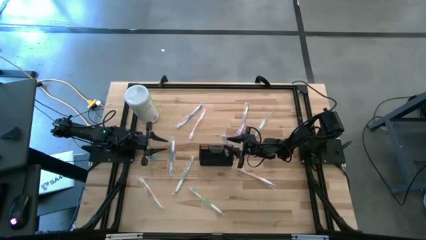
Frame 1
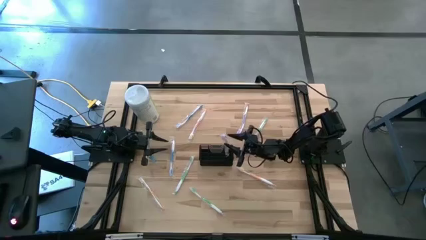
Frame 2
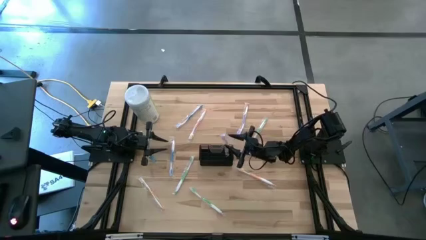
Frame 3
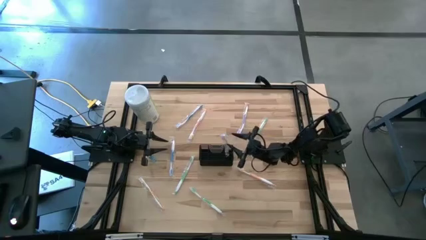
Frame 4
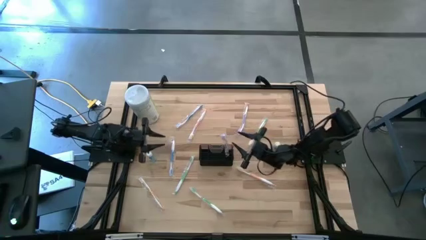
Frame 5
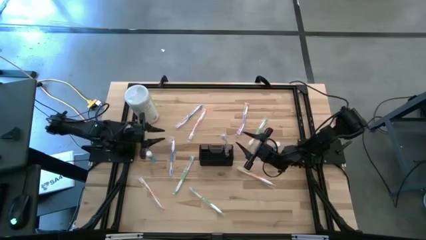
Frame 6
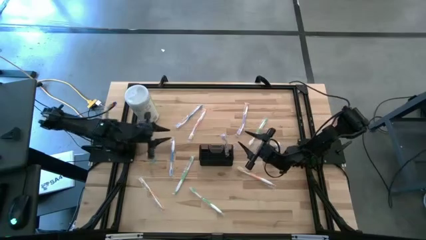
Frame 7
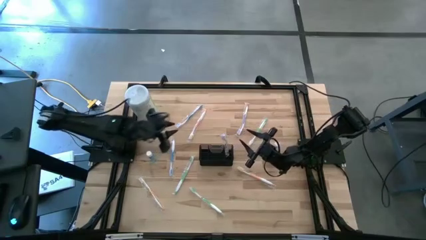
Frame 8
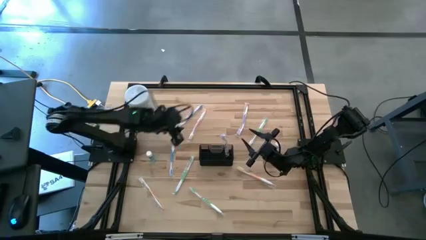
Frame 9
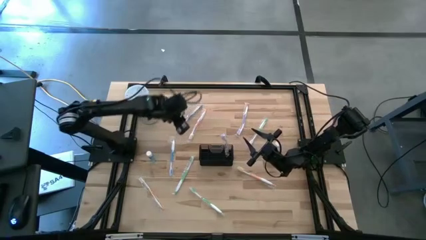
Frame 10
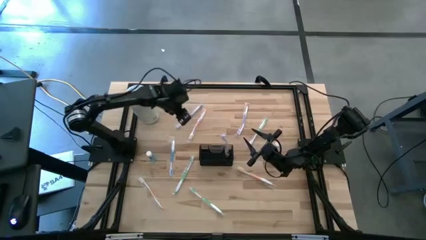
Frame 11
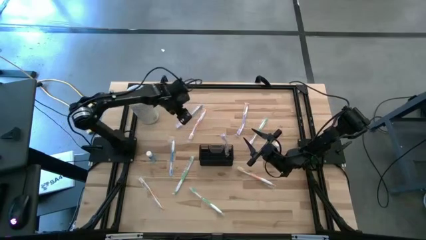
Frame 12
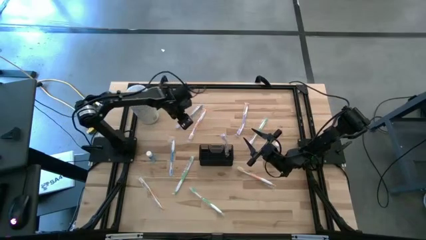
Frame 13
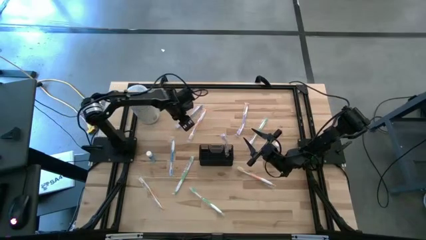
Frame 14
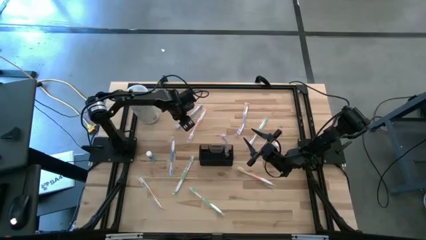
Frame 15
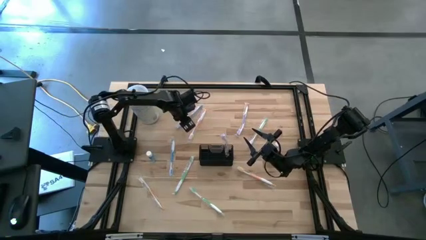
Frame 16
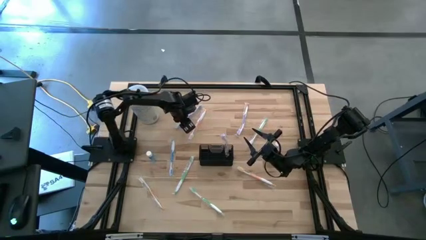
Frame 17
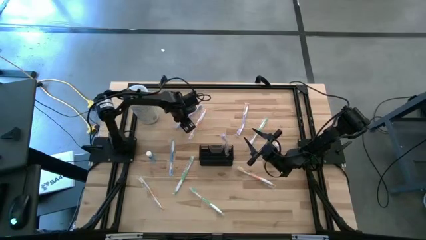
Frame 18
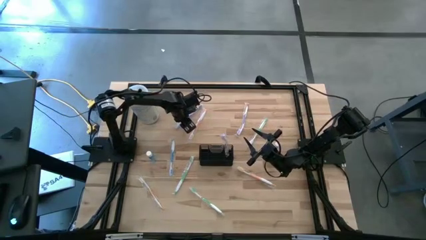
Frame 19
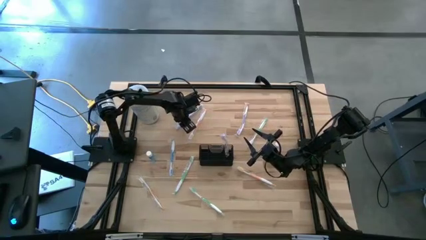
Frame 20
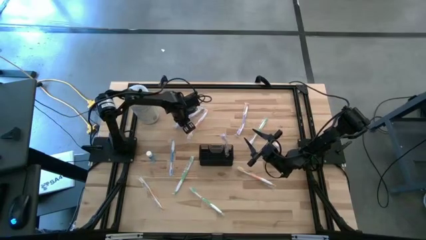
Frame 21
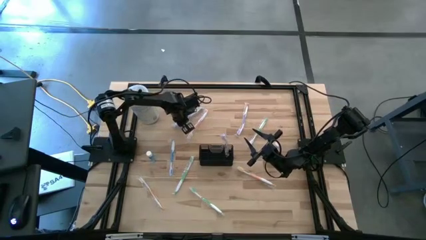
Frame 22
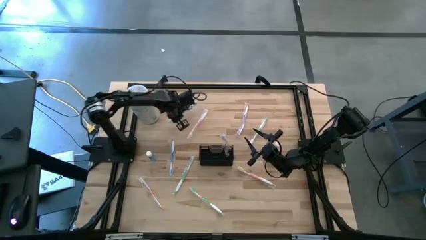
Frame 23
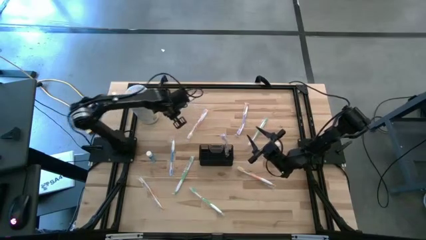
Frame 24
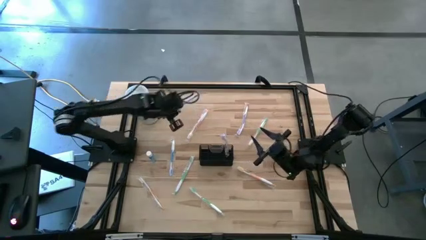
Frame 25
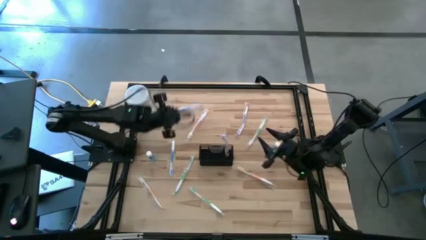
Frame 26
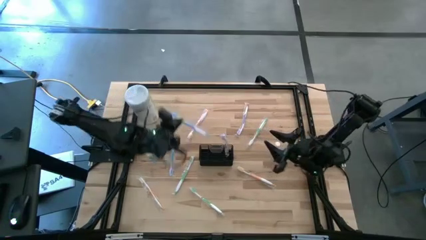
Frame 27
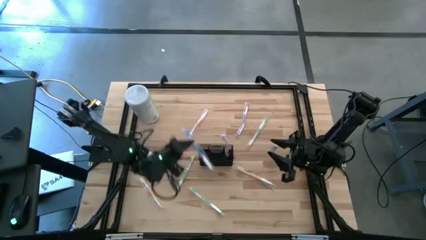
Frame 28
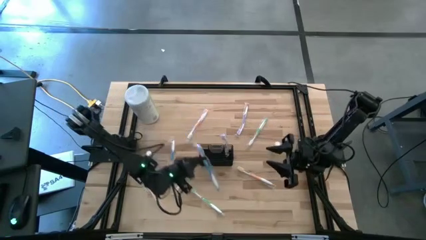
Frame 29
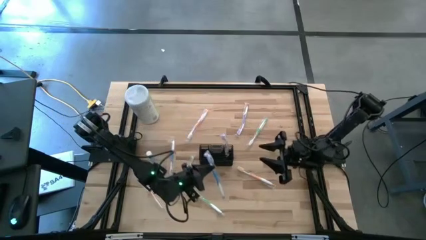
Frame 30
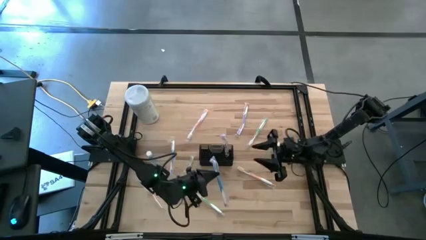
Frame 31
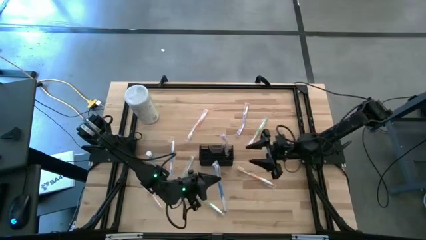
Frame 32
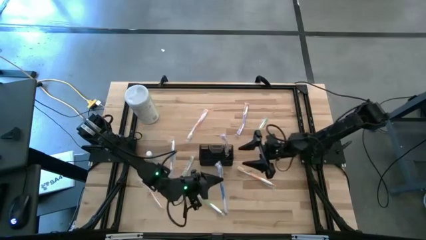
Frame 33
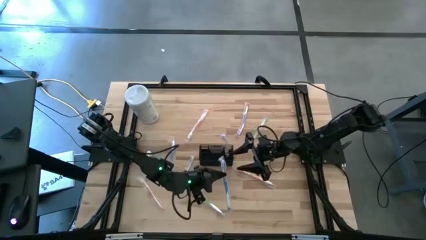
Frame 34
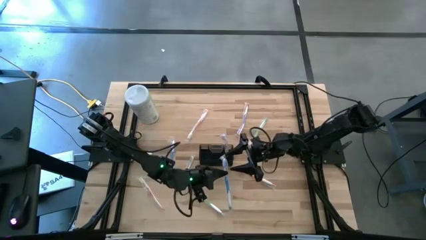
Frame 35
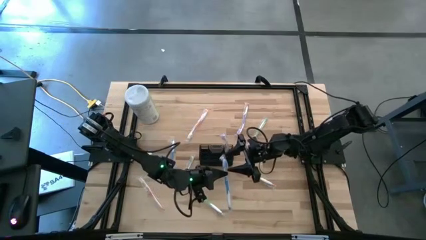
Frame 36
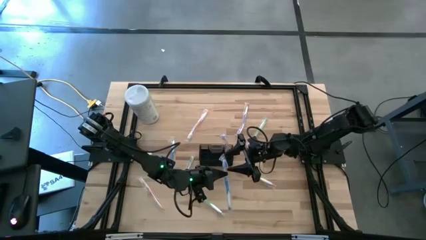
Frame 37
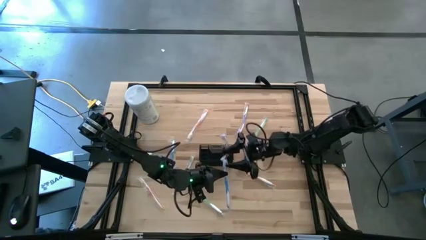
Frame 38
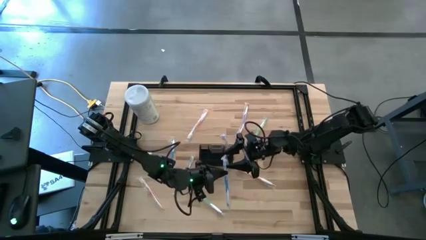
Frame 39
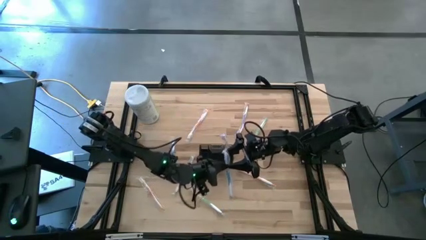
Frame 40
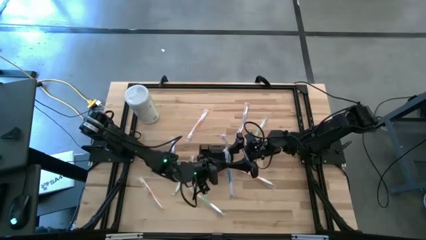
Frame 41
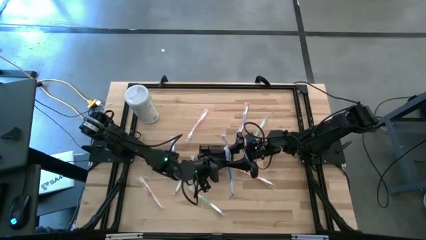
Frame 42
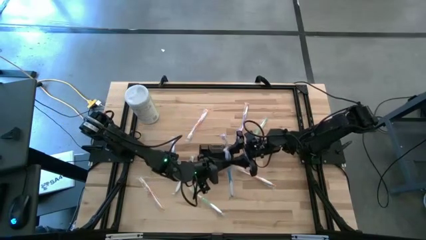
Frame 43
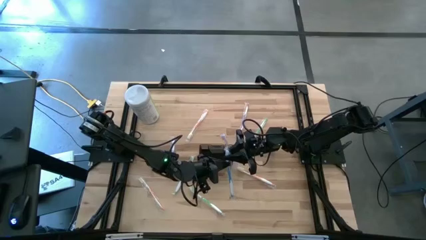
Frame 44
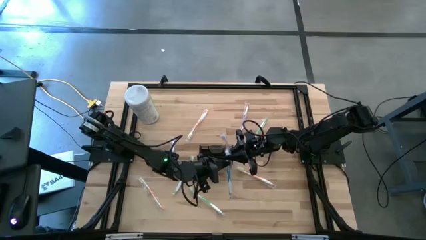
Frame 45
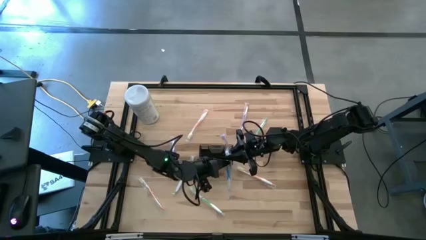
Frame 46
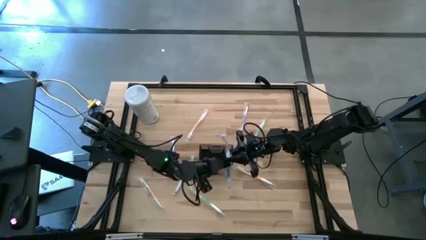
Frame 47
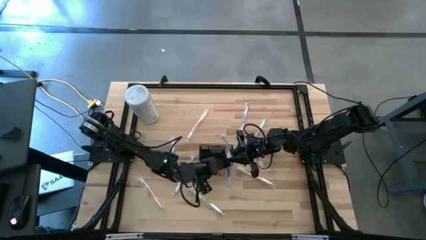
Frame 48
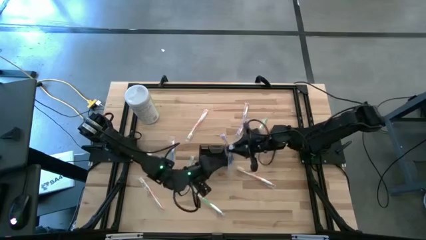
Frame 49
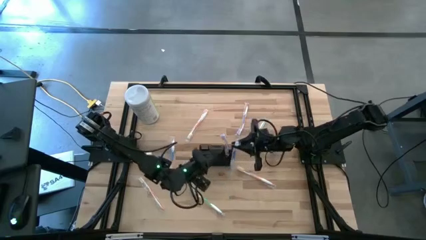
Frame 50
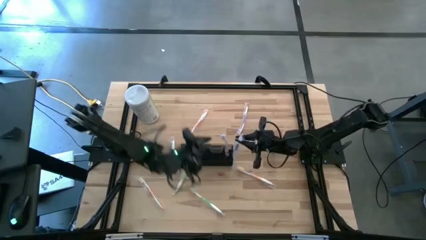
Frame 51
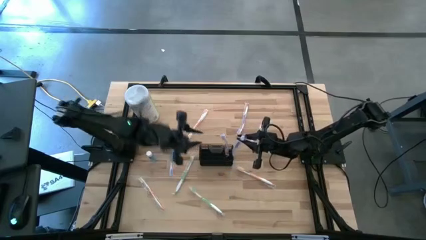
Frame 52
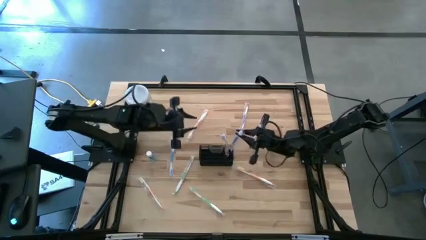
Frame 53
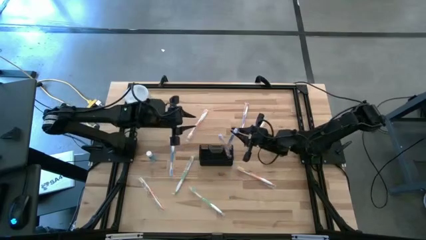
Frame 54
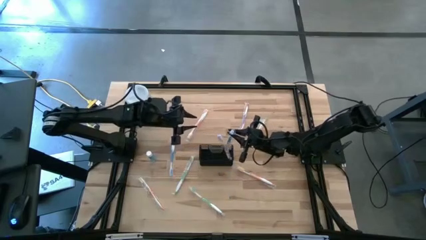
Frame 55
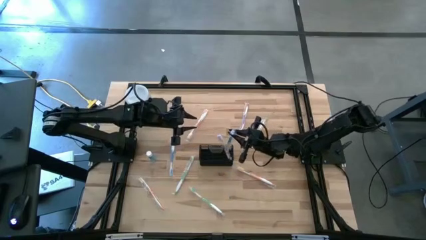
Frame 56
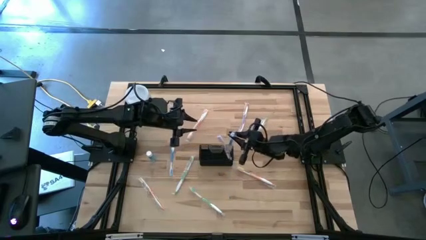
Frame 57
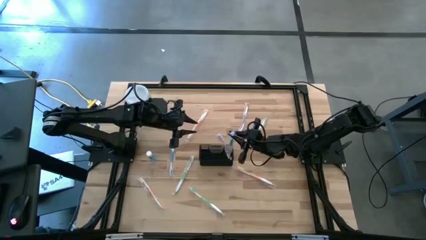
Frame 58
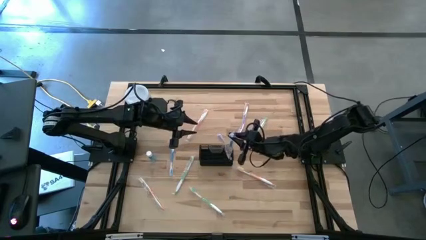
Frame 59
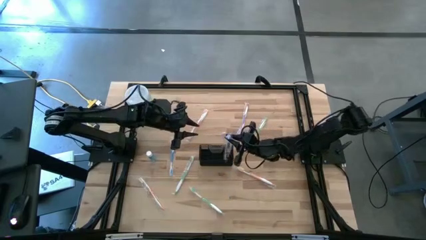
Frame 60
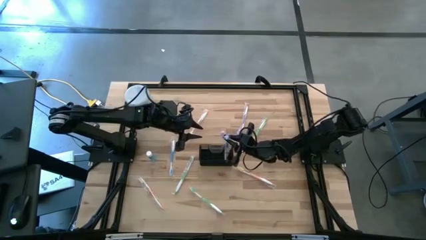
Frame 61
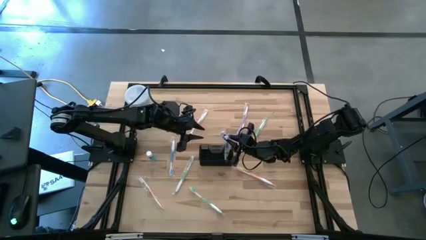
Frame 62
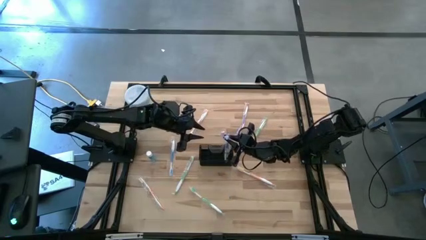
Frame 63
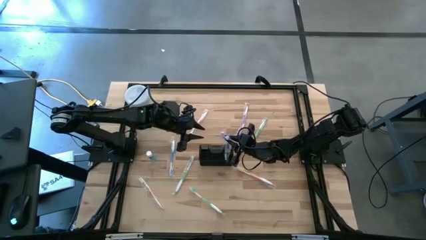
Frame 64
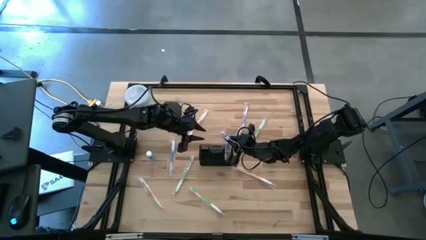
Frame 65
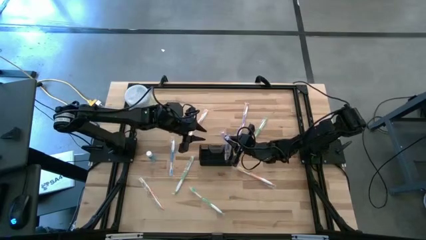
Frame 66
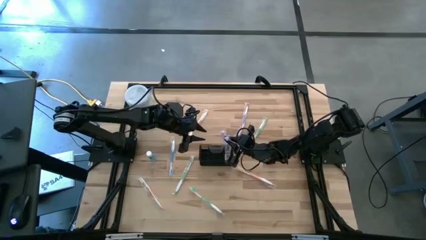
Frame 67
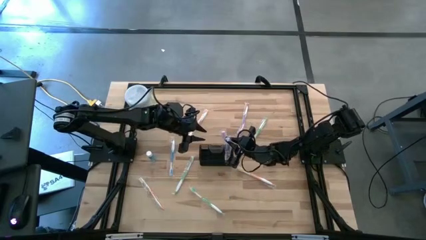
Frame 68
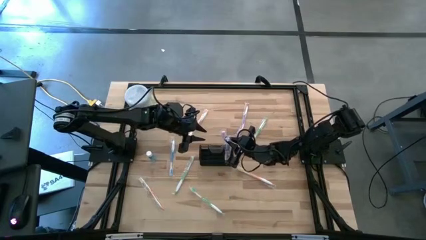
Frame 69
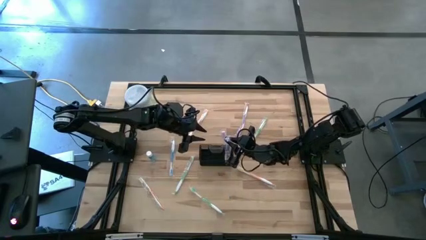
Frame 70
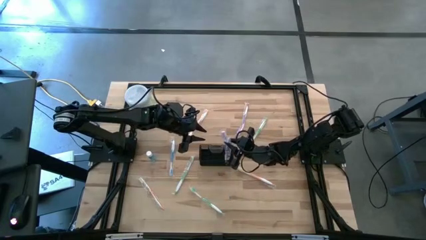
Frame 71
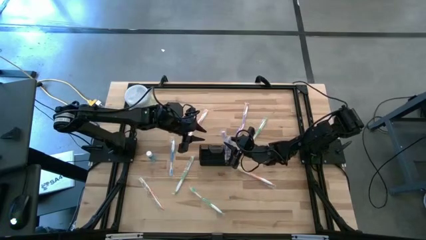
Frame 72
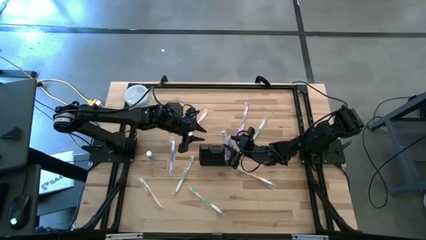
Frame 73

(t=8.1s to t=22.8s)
Task: Pick & Place toothbrushing station
Put the top blue toothbrush into the black mesh
